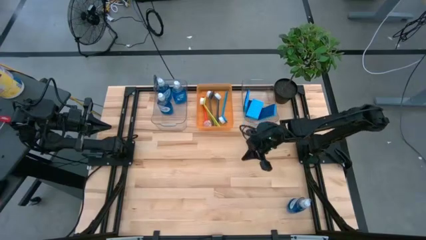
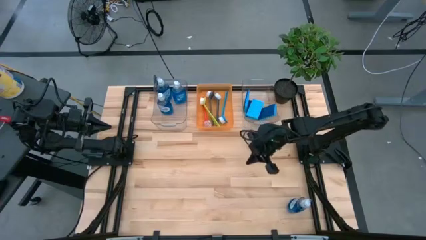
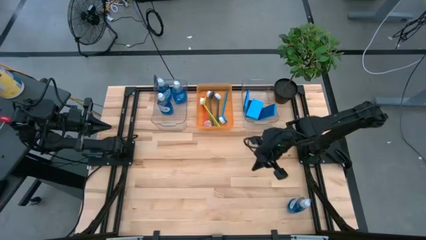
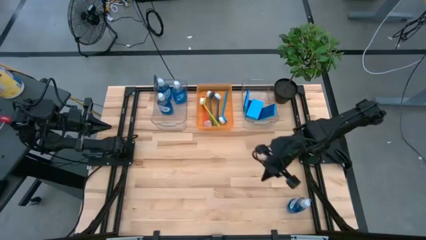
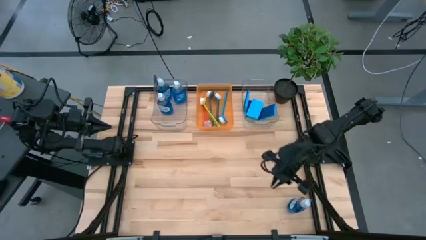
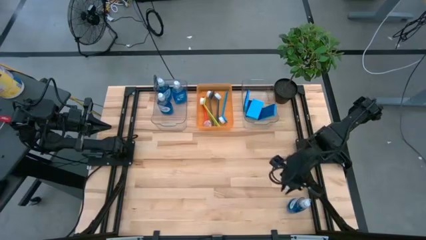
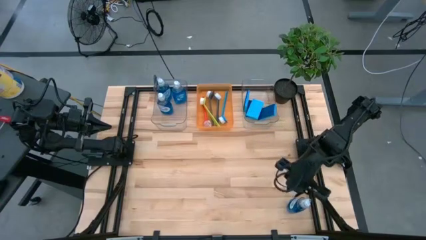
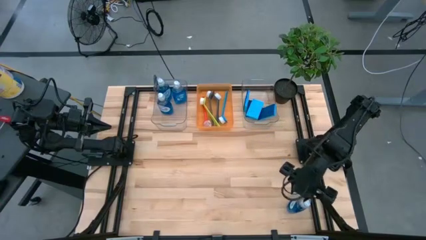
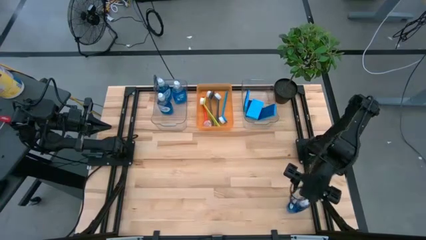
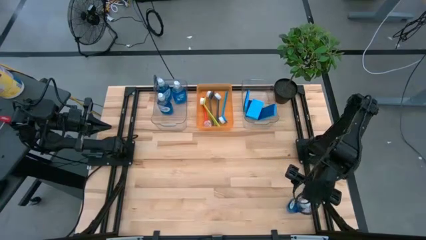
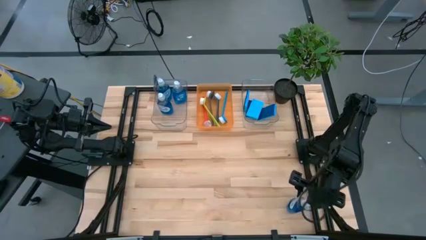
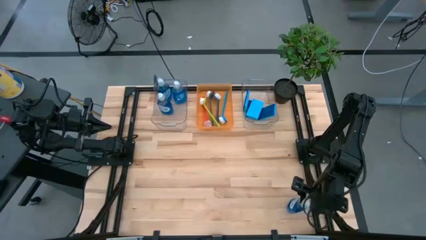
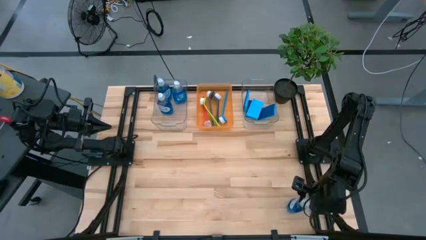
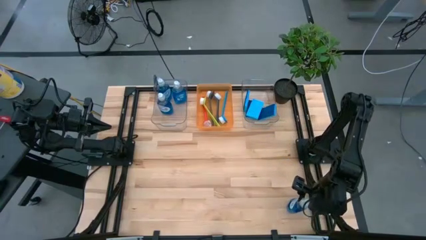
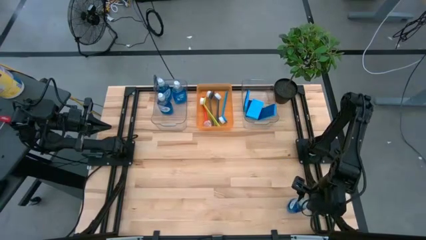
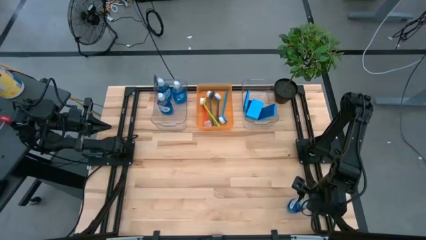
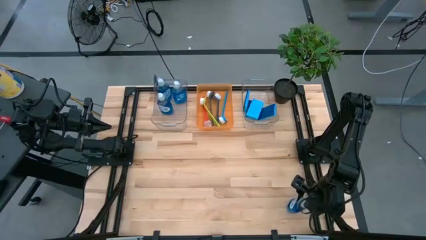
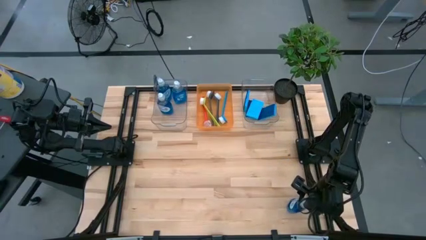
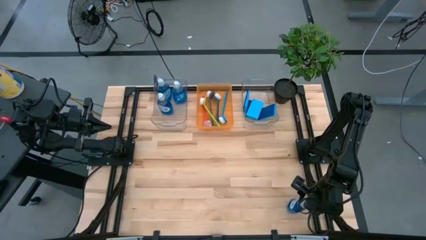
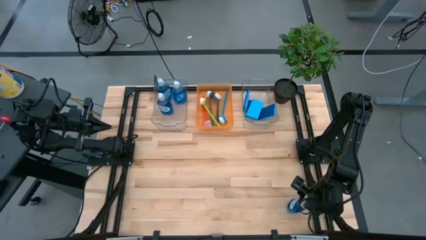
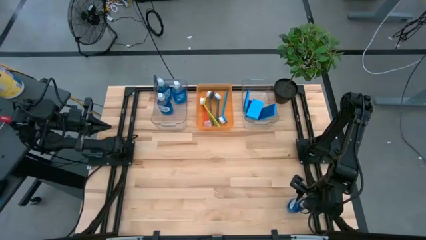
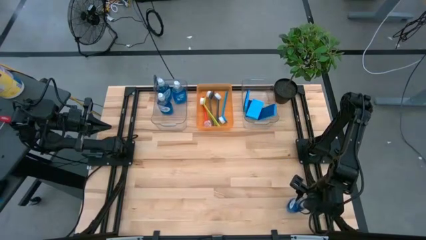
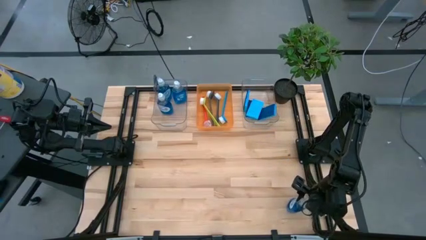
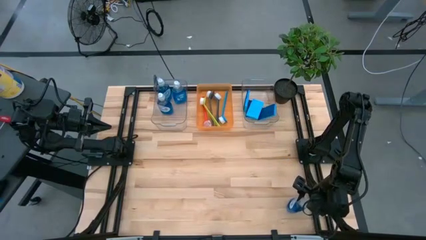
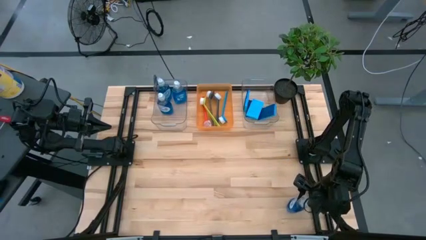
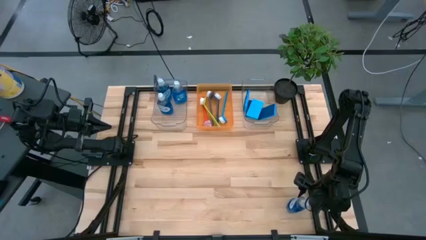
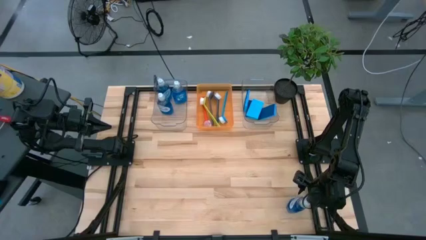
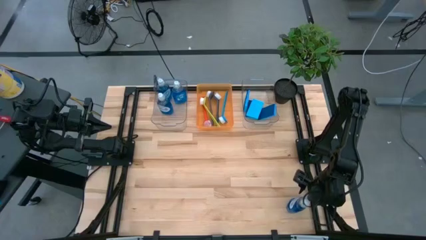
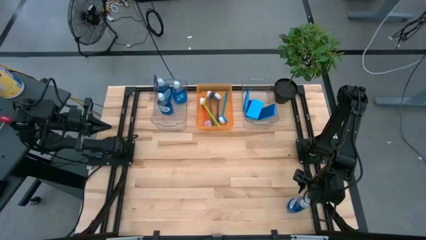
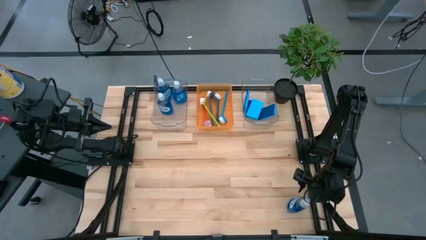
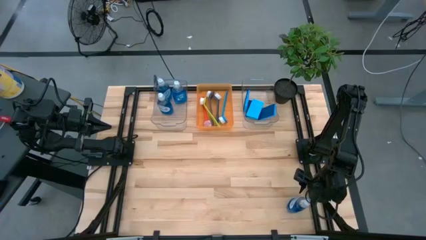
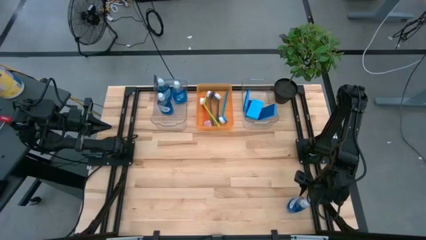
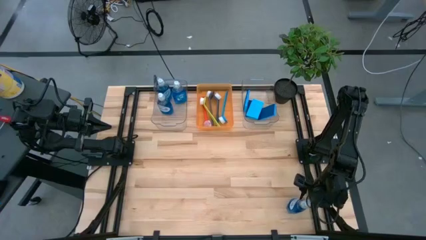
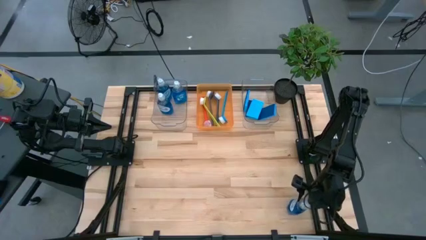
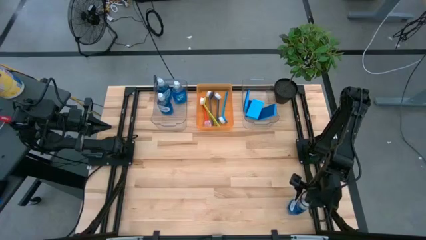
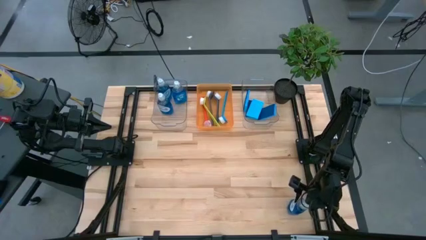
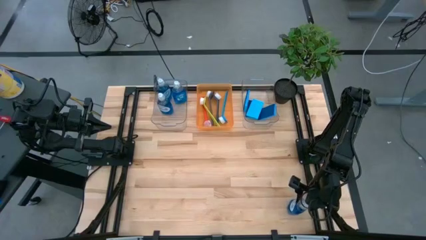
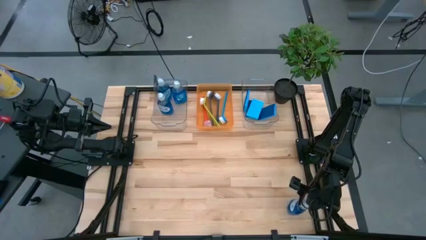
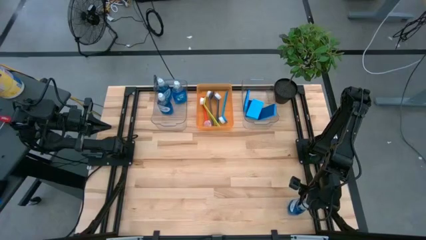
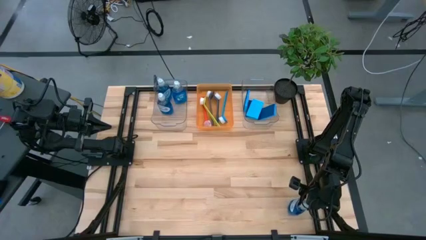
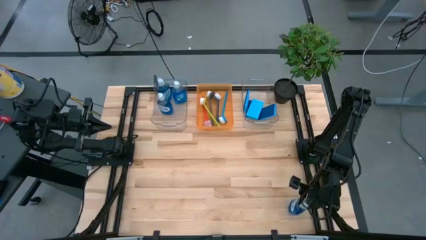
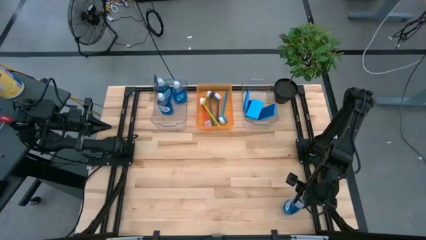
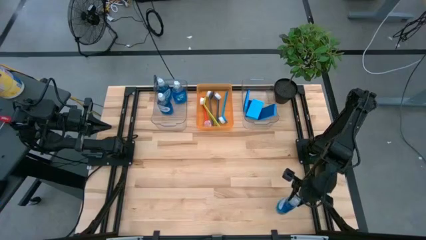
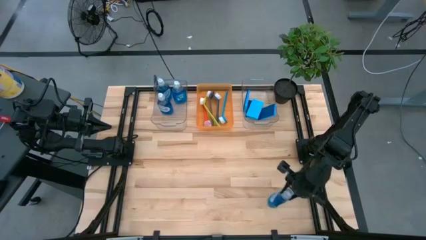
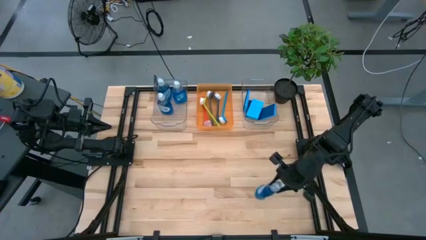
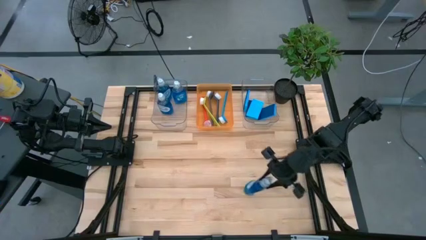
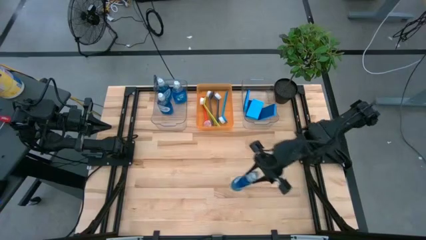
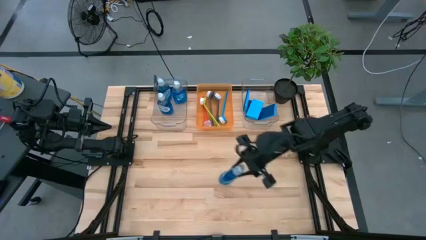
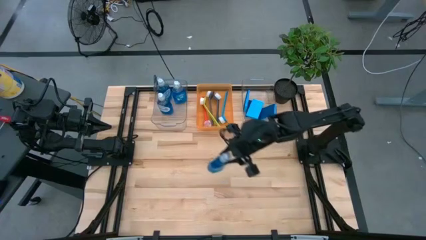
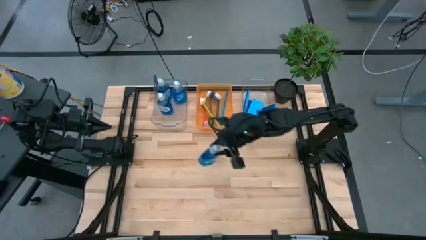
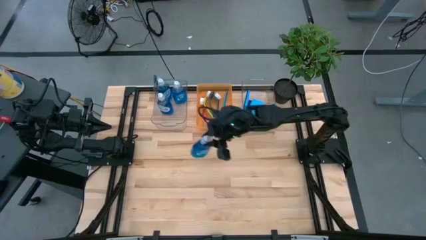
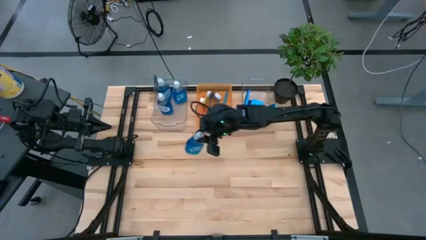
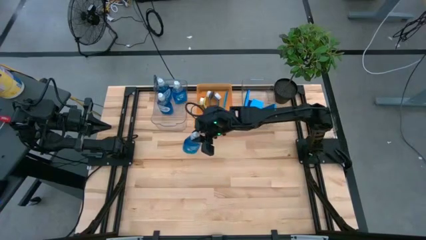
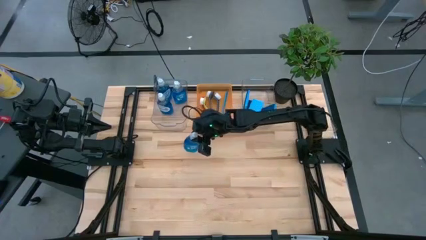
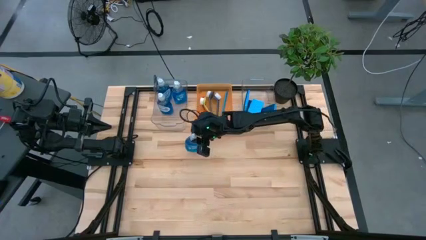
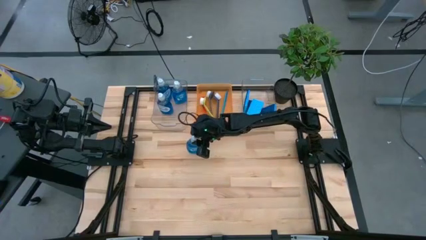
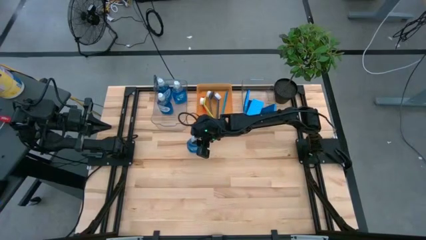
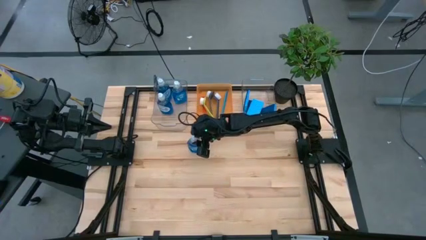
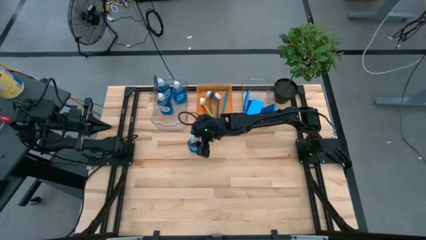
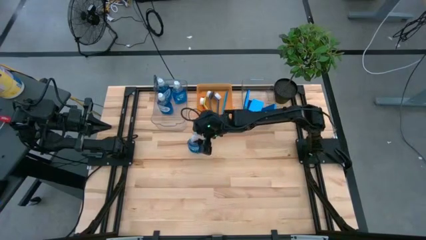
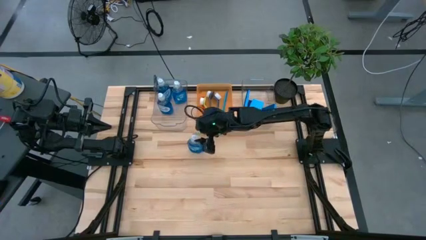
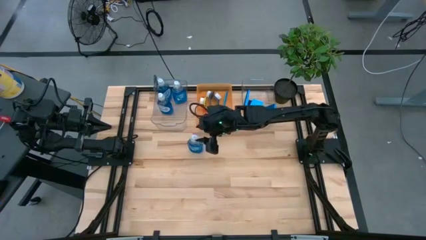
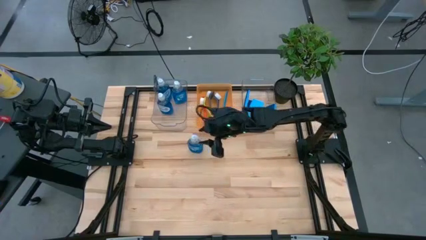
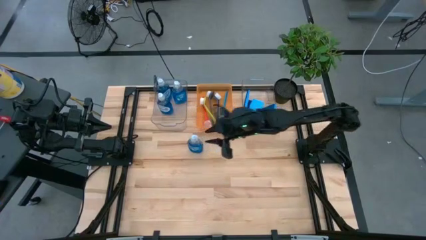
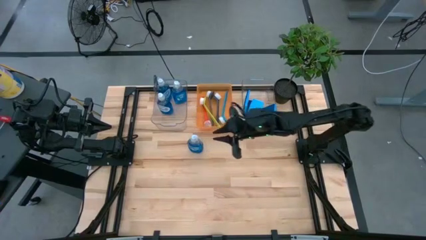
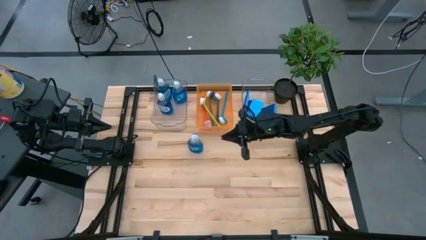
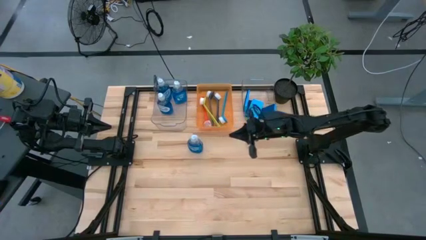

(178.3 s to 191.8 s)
Task: Pick & Place Kitchen Sink Supplies
Put the dish soap into the left transparent bin
